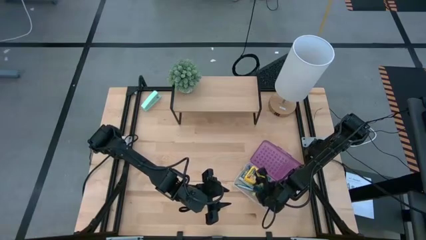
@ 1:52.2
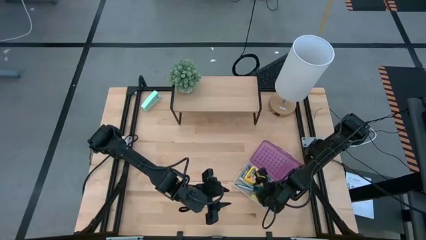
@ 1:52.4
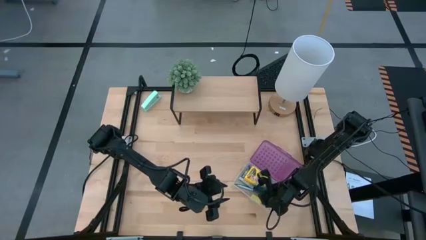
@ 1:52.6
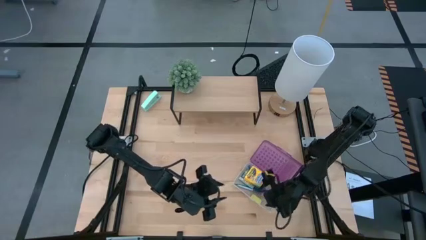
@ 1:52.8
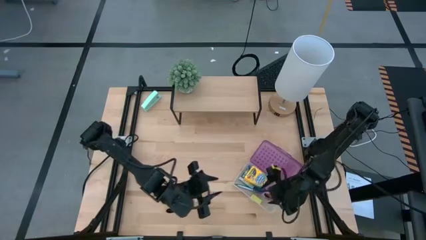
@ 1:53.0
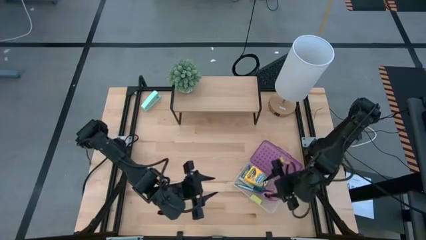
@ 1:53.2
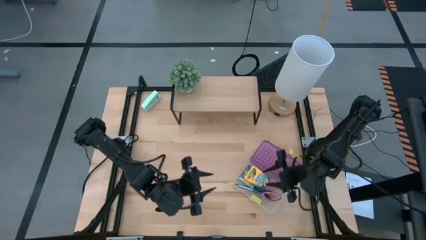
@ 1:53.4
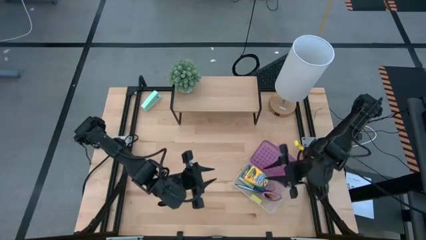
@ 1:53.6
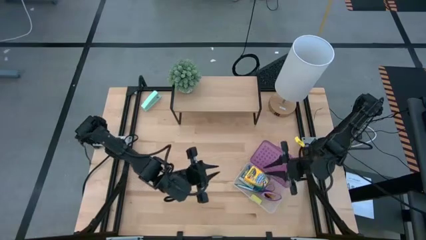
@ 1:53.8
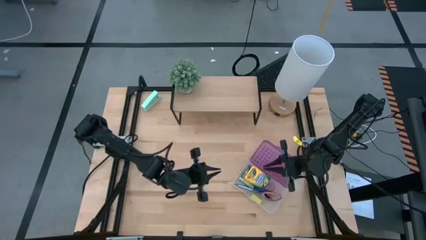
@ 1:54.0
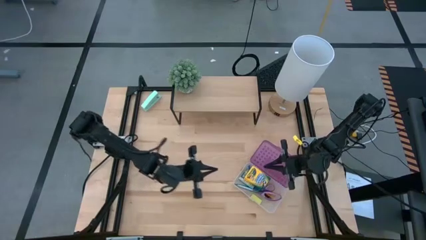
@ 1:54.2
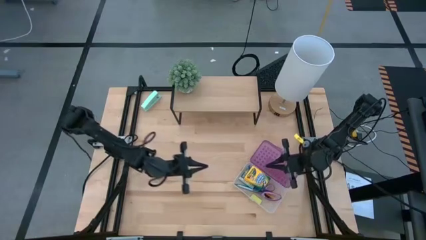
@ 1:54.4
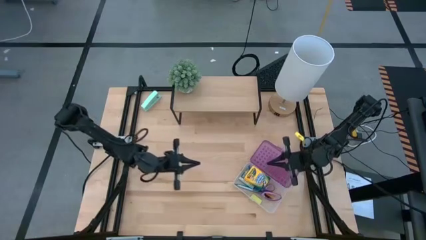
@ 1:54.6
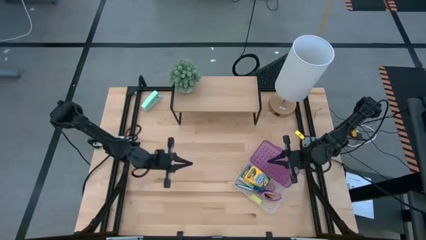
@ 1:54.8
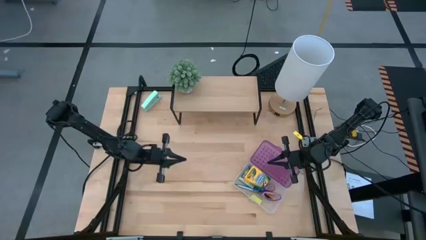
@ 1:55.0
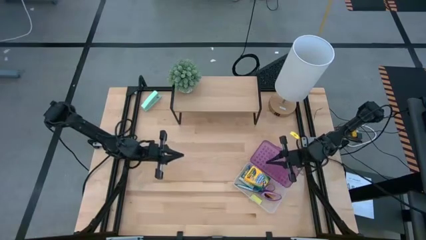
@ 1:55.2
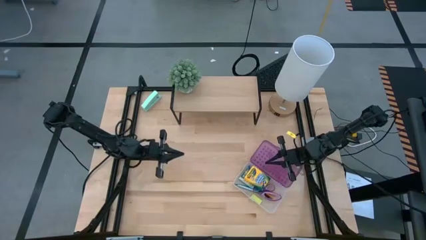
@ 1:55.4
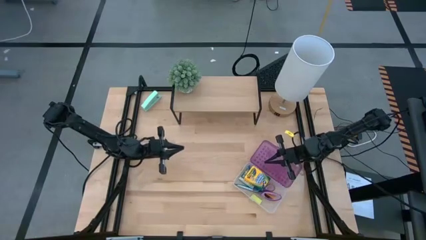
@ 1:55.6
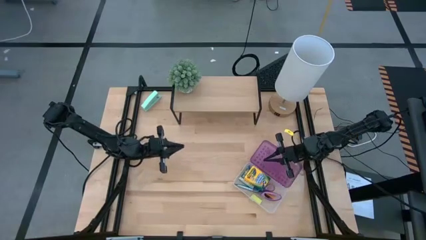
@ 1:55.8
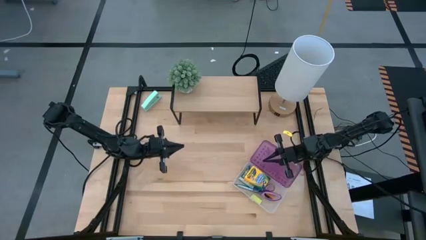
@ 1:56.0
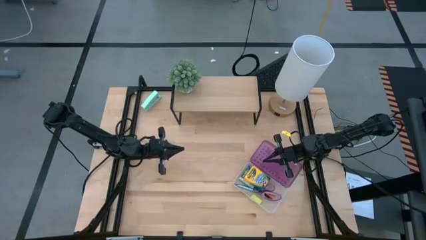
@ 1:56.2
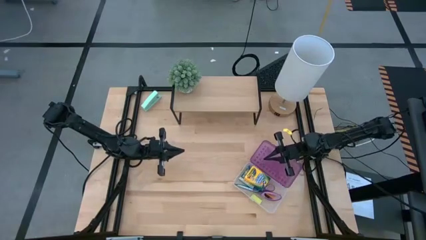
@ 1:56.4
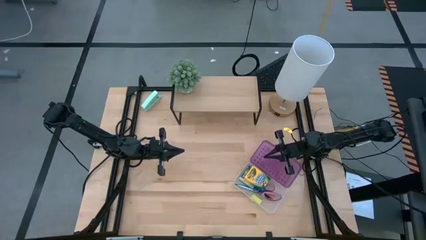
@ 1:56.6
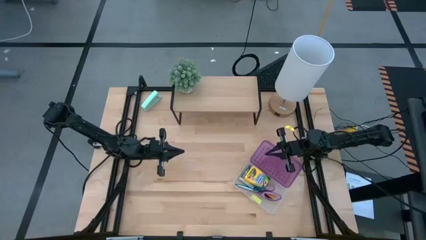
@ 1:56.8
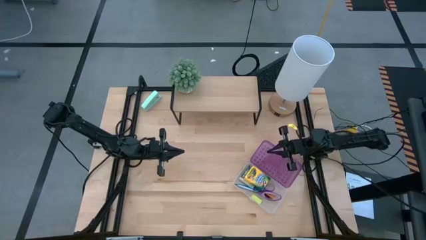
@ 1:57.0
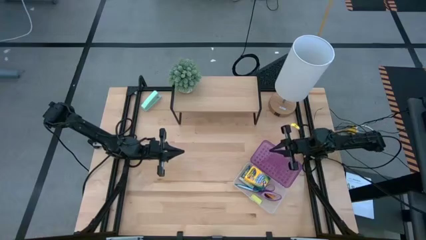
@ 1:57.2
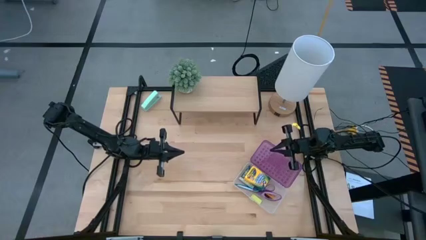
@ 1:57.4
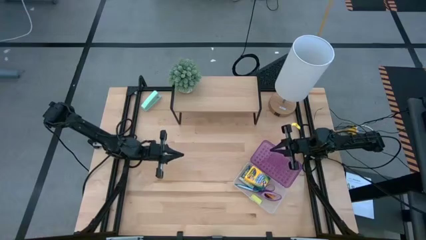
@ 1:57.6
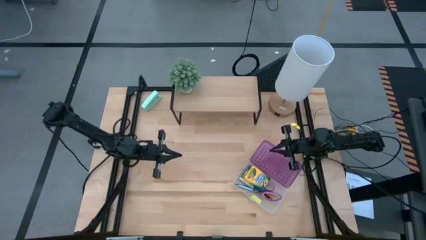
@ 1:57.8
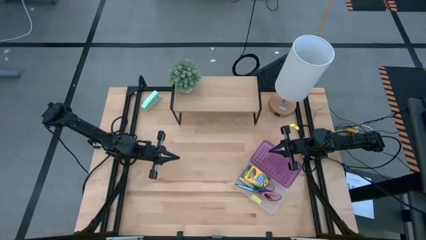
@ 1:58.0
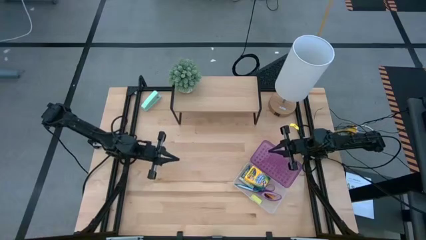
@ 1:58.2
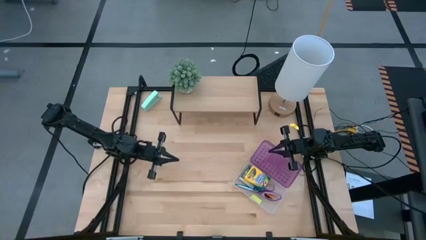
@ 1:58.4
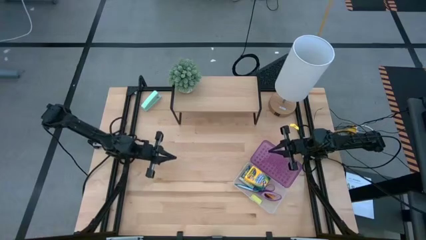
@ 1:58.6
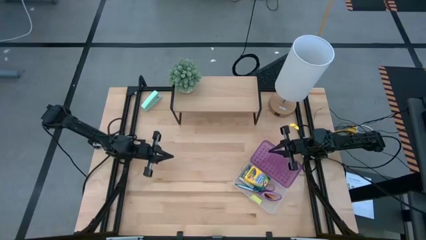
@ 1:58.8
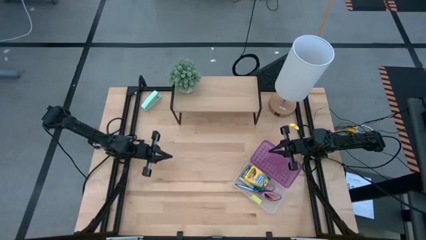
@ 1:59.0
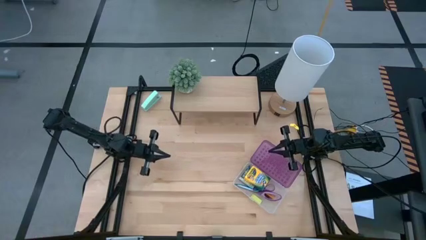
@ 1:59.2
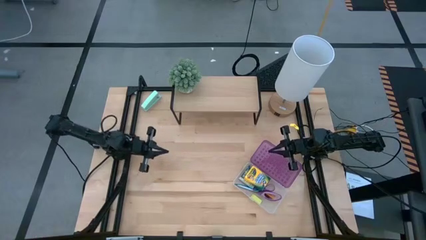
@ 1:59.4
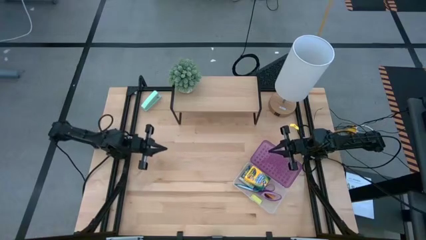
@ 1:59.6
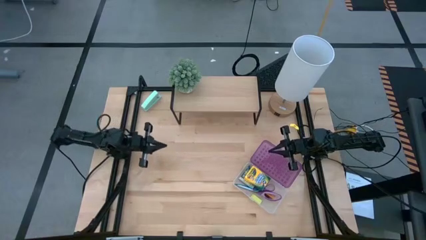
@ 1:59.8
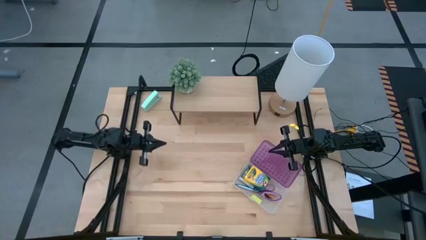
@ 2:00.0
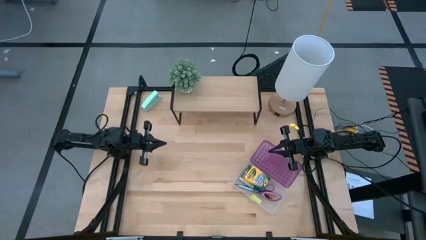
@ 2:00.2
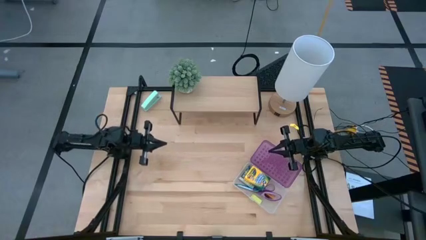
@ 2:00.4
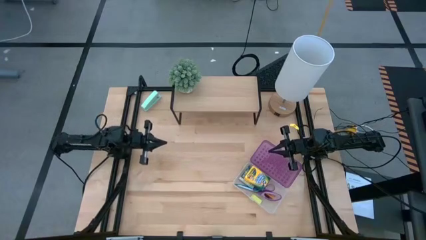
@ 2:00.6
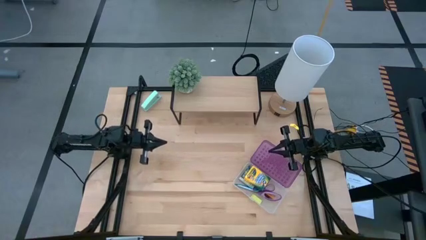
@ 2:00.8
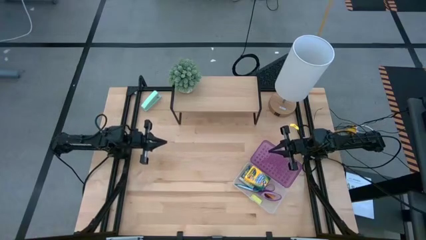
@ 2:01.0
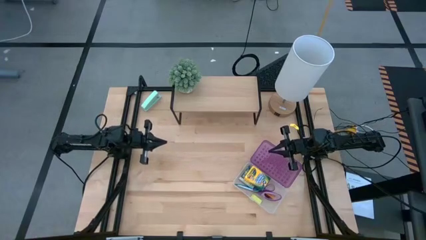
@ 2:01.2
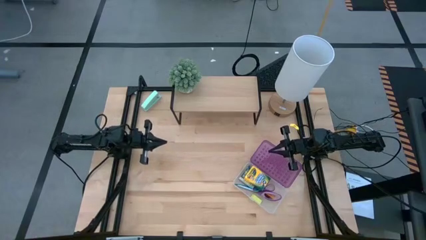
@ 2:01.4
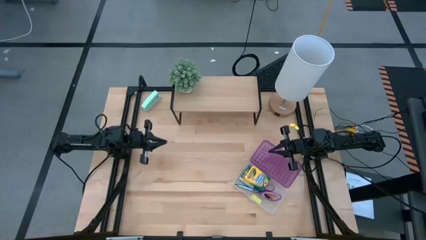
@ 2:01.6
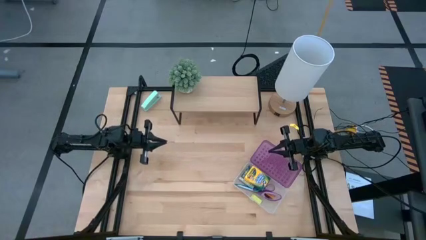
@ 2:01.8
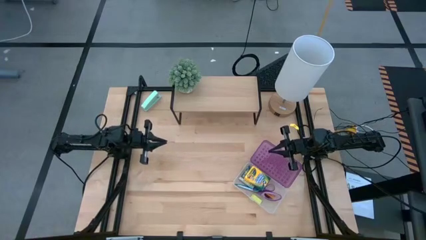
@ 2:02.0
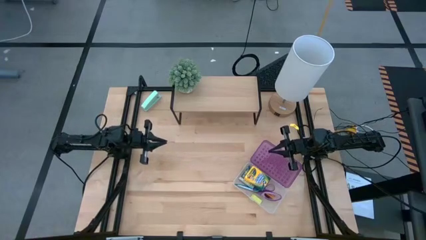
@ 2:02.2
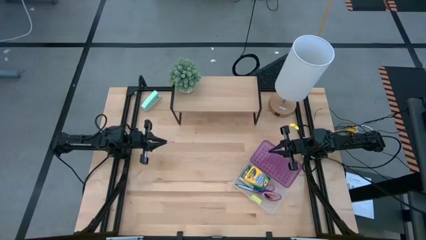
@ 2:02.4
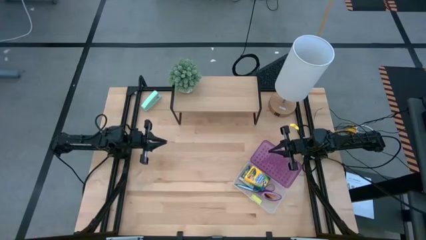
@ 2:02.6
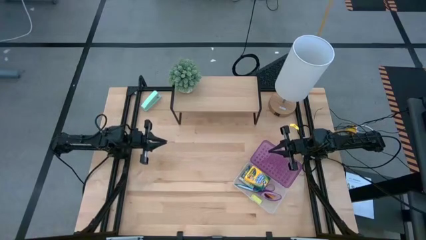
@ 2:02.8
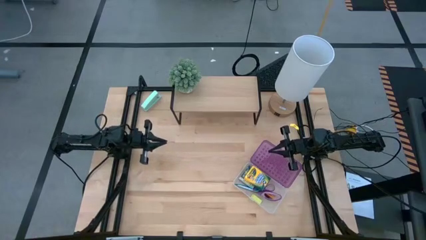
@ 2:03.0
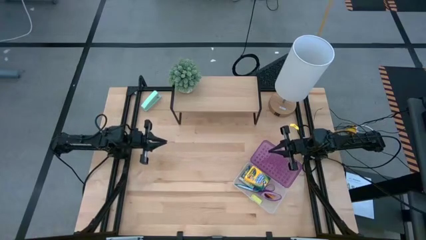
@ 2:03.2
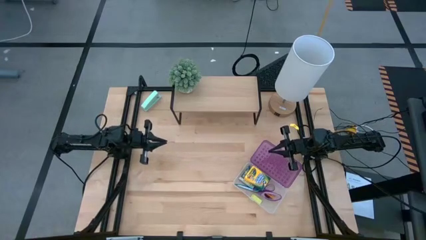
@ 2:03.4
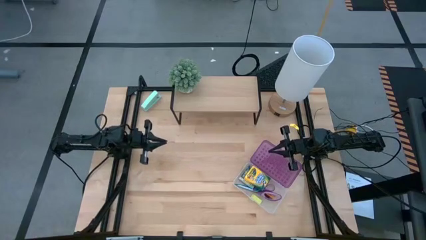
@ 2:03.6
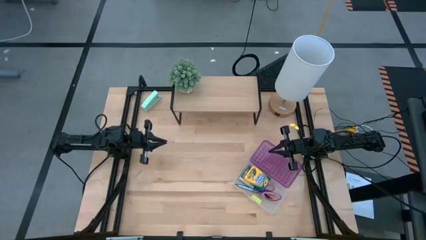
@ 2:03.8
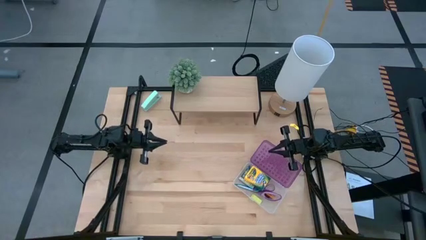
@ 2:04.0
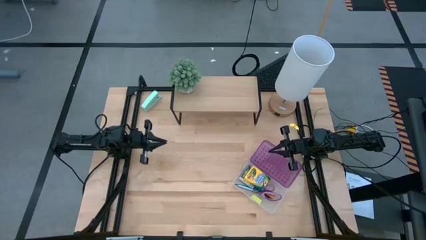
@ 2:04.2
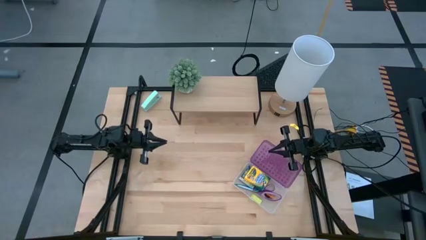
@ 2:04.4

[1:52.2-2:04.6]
Task: Pack school essentials
Return to Home Position
